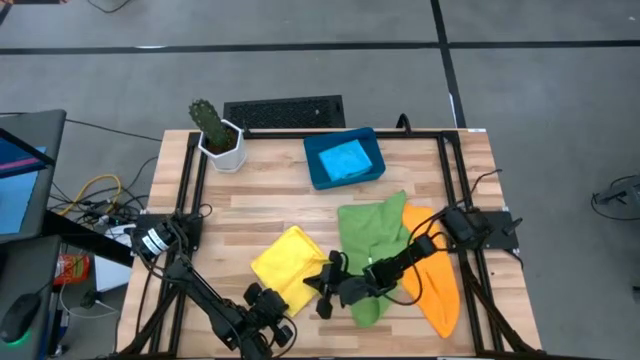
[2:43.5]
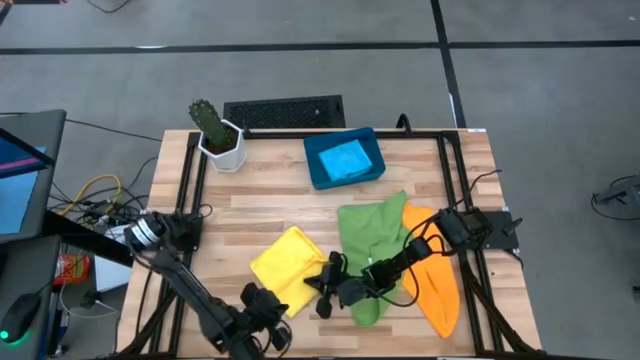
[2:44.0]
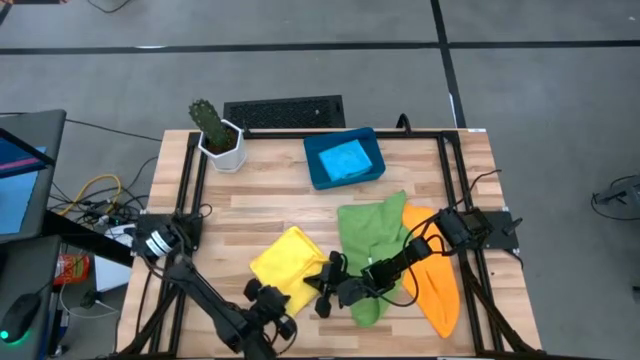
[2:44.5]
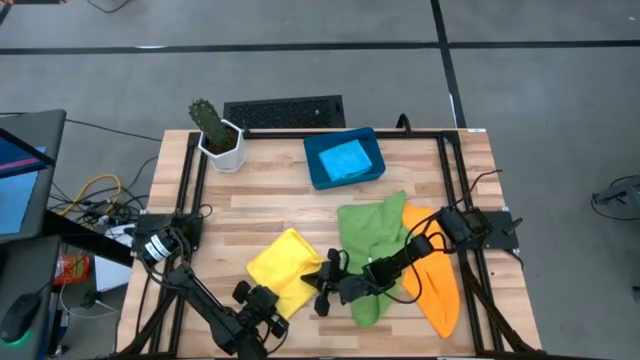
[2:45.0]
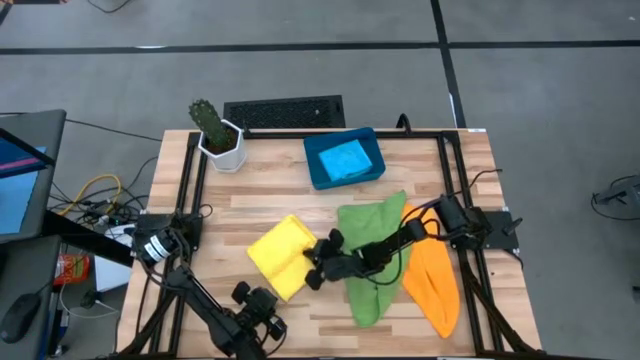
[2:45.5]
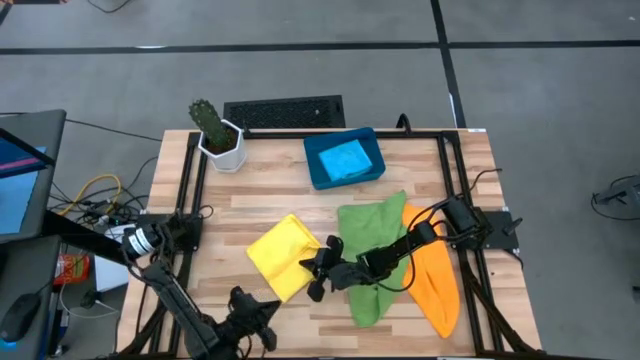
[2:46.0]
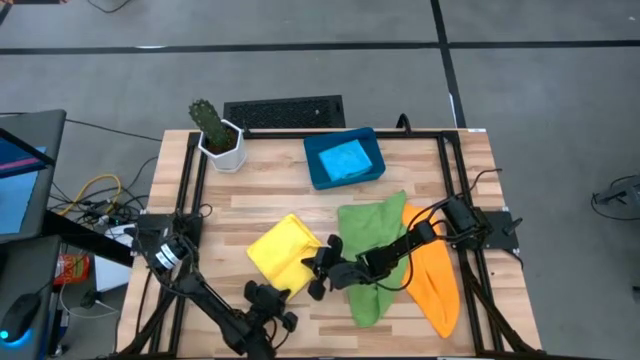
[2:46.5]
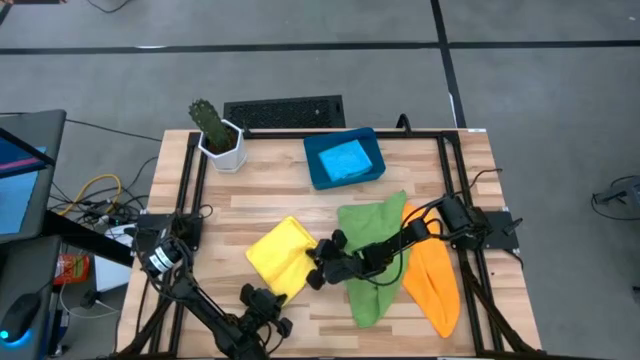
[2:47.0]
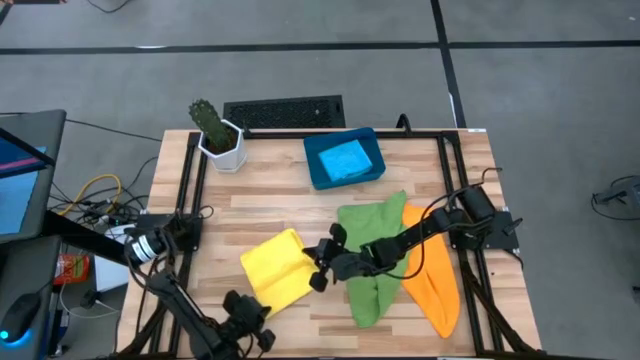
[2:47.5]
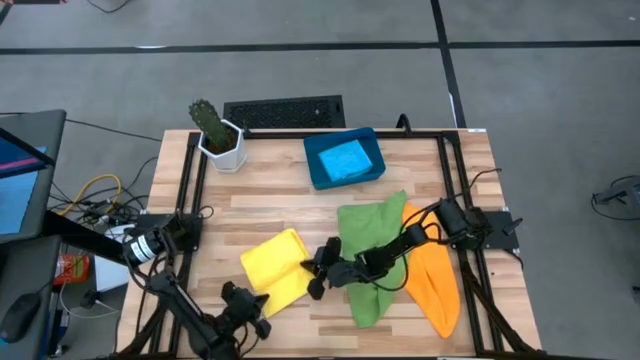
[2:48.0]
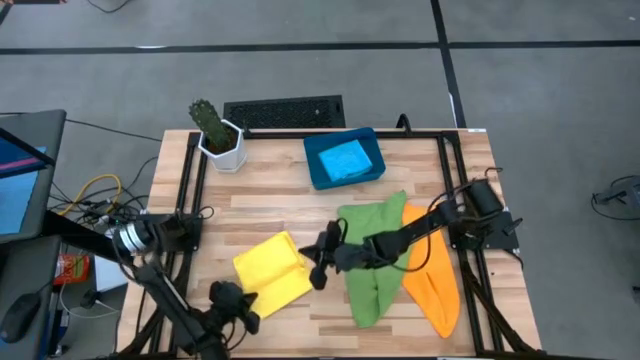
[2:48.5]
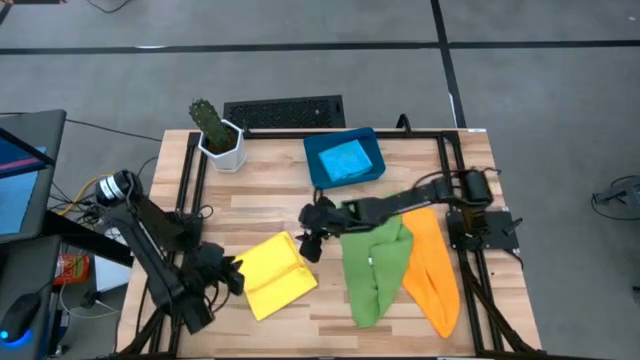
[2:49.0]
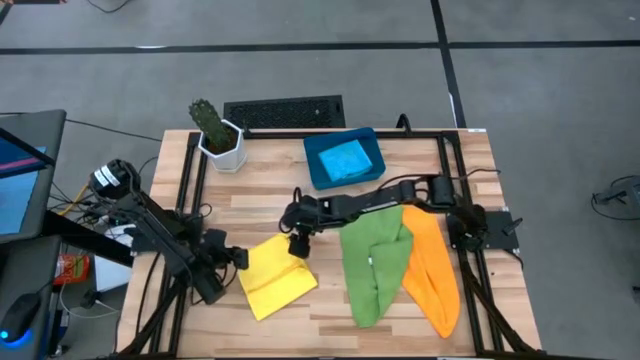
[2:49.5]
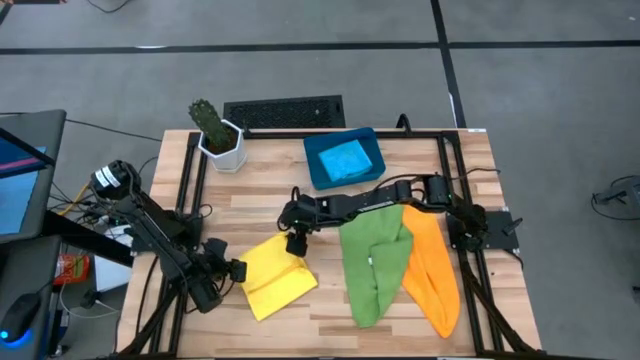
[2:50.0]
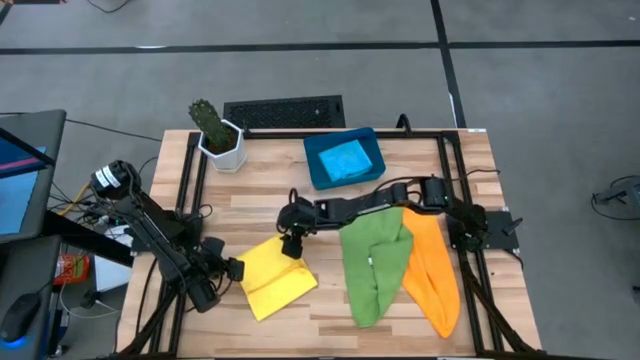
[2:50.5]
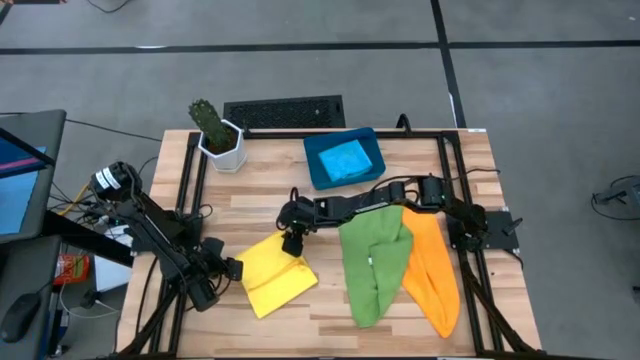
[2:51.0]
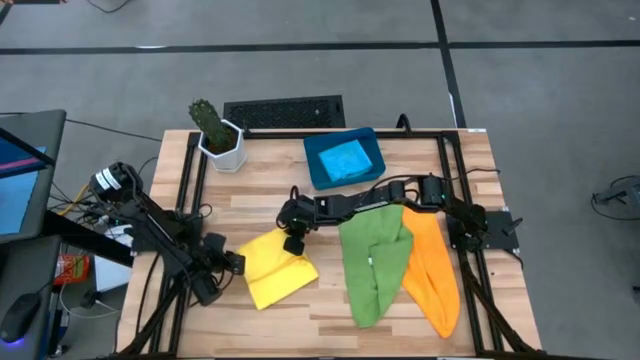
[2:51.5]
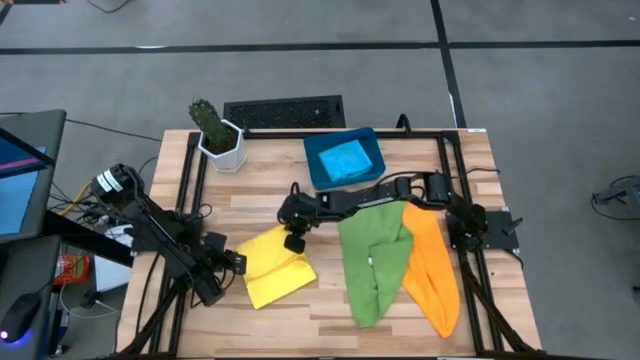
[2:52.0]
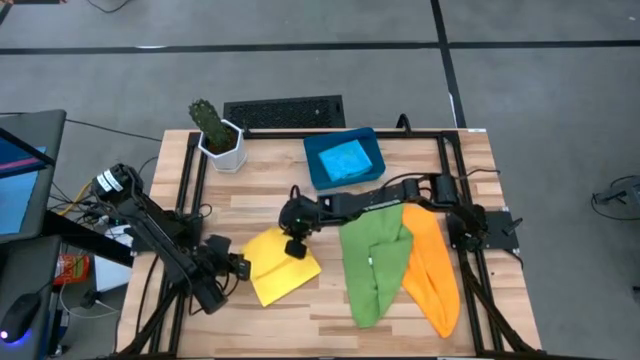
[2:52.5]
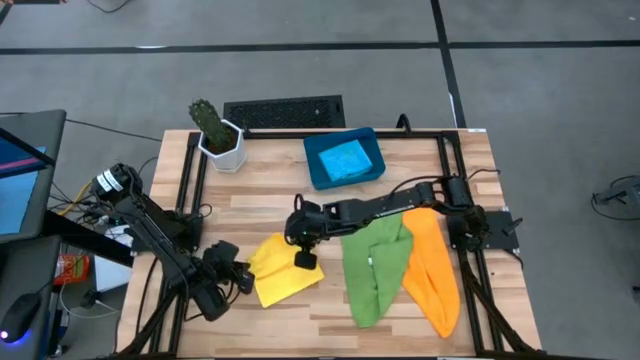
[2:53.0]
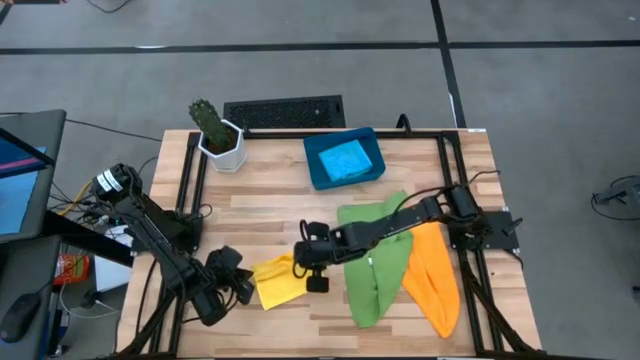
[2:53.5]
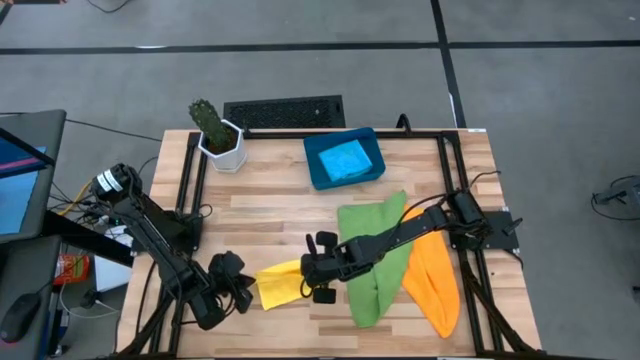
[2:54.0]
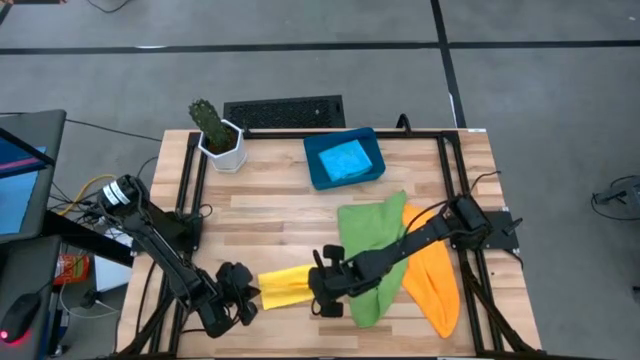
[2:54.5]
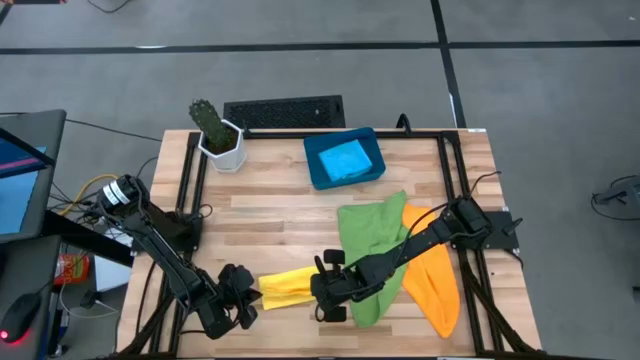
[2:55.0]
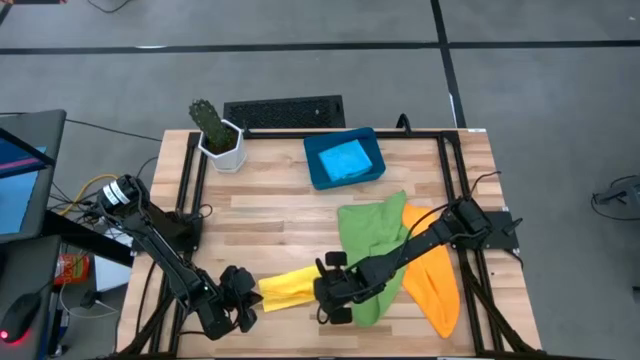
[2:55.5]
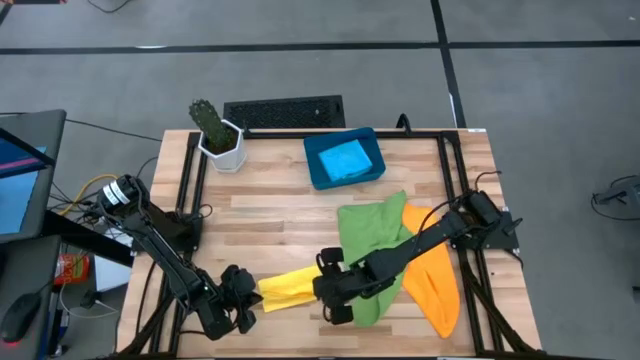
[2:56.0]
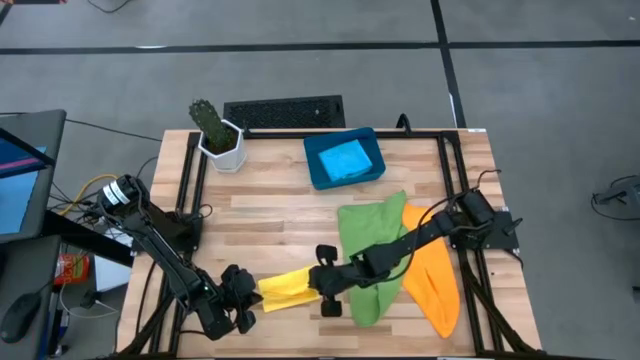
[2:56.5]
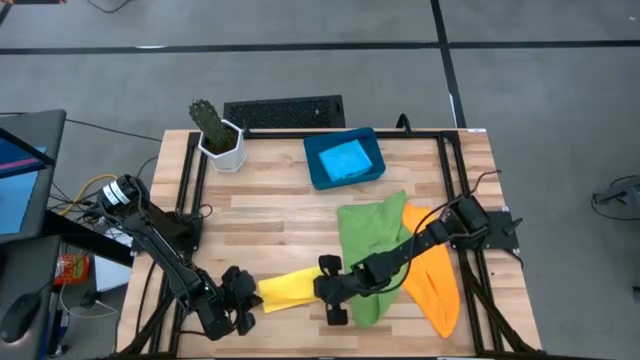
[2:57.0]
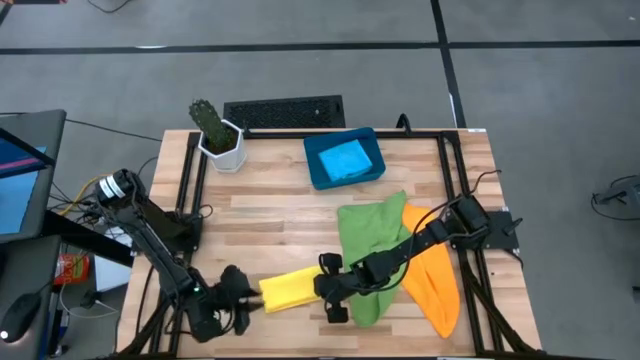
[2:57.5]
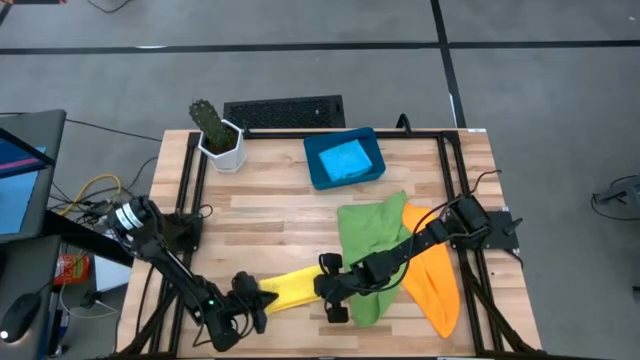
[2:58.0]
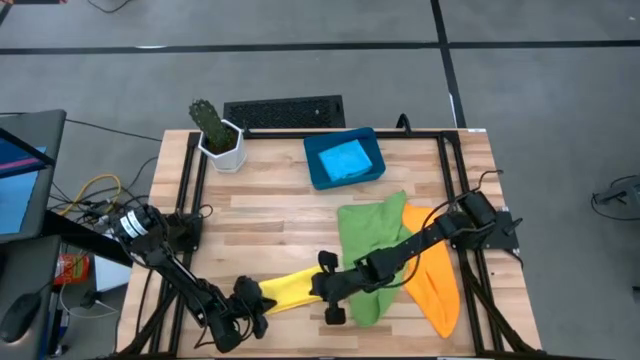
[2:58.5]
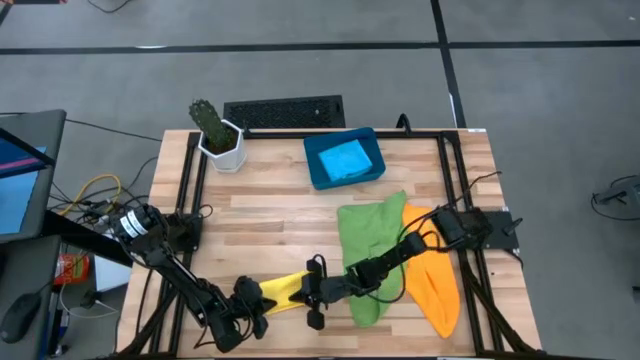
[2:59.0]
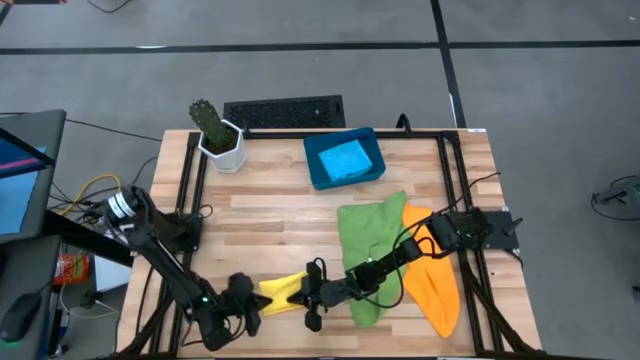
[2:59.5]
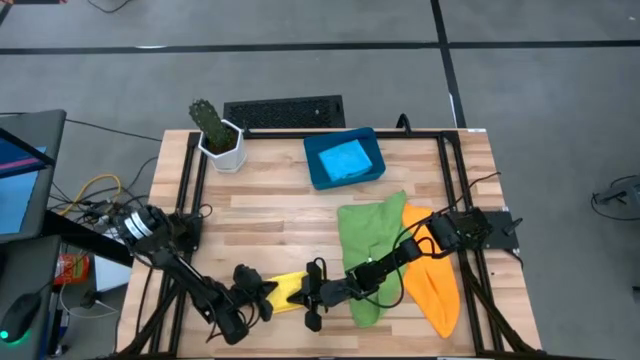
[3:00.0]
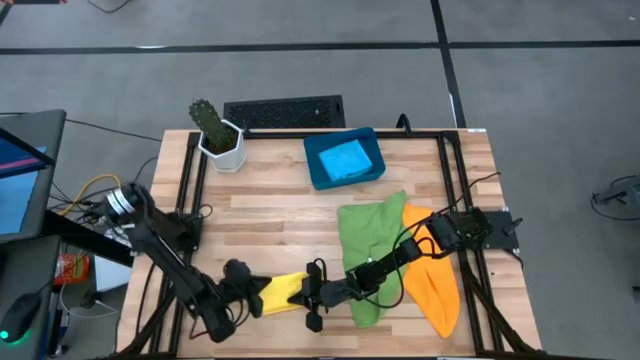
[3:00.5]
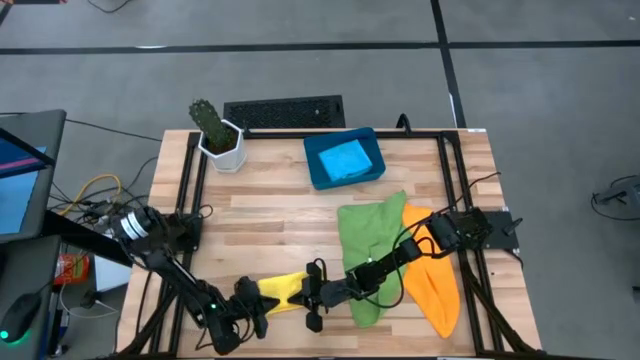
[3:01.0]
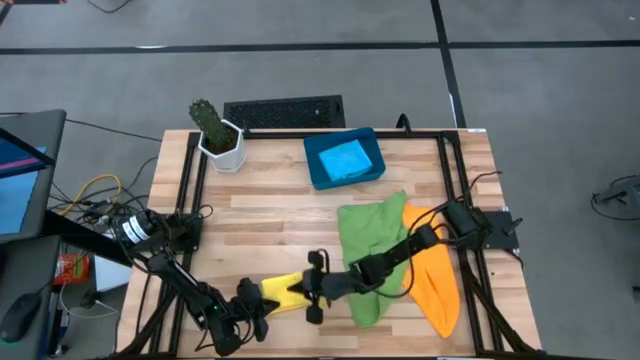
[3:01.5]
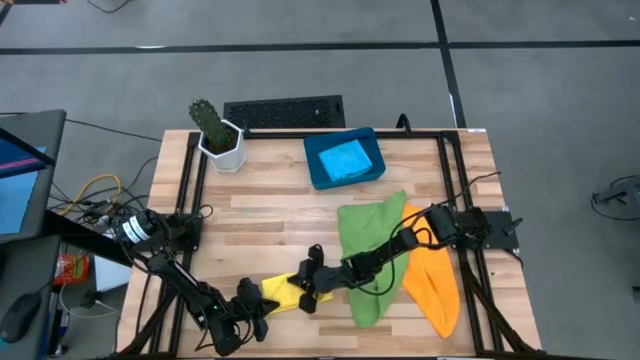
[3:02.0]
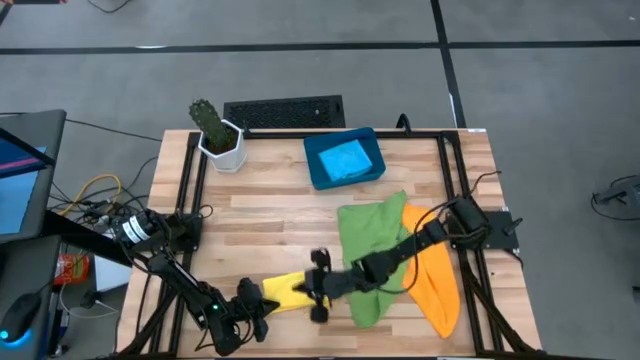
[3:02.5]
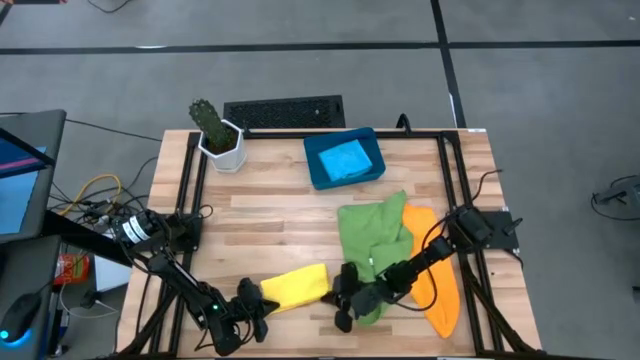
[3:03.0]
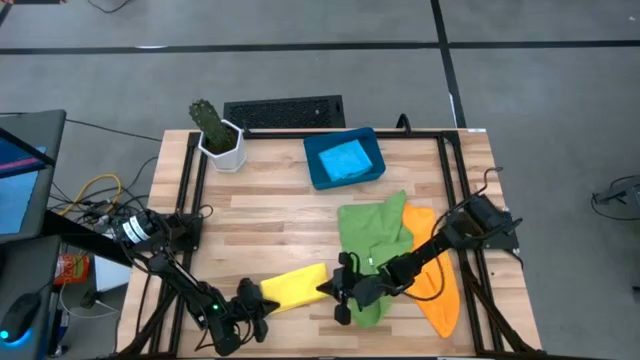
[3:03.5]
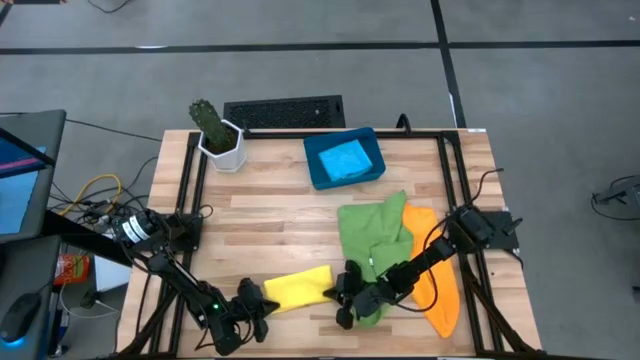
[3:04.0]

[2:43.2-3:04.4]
Task: Fold microfiber towels
Fold the yellow microfiber cloth
